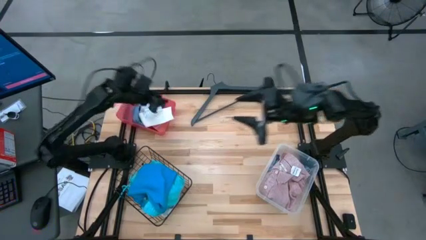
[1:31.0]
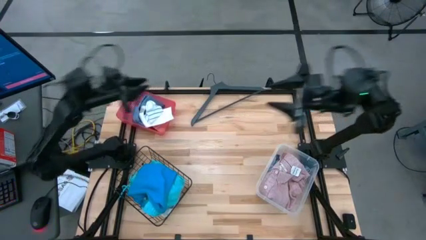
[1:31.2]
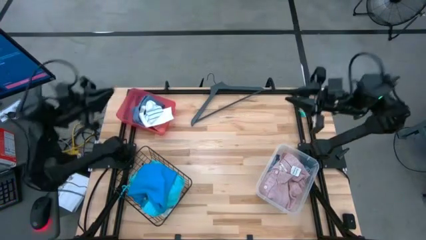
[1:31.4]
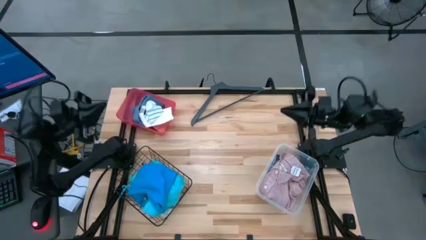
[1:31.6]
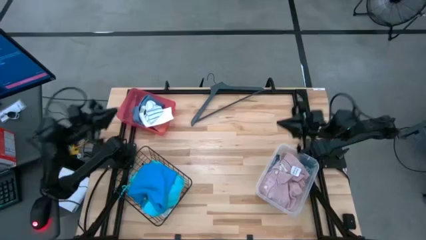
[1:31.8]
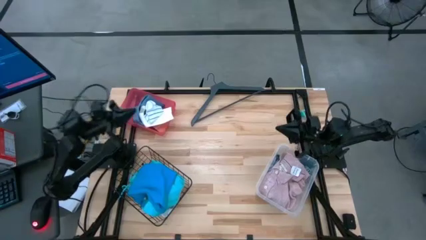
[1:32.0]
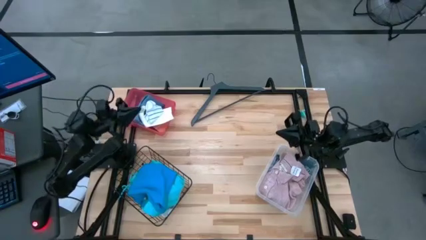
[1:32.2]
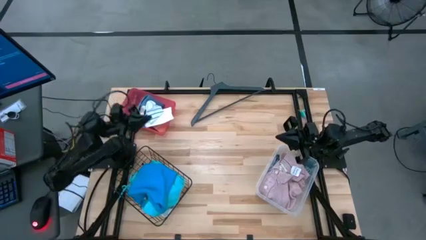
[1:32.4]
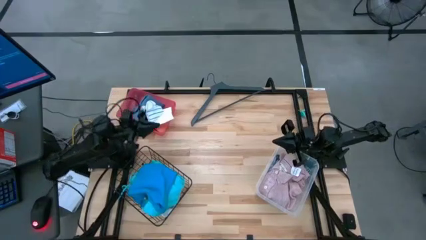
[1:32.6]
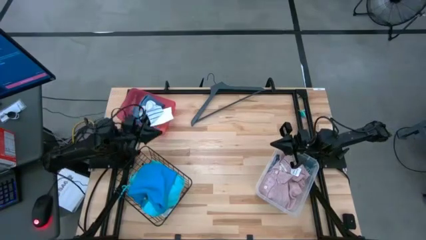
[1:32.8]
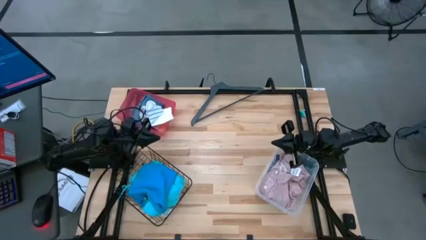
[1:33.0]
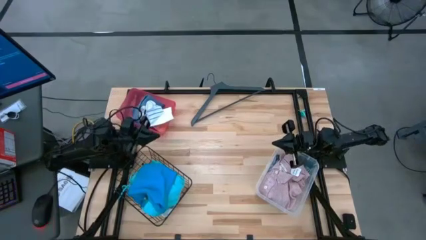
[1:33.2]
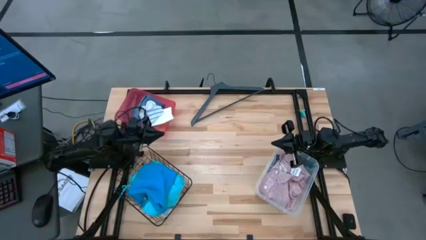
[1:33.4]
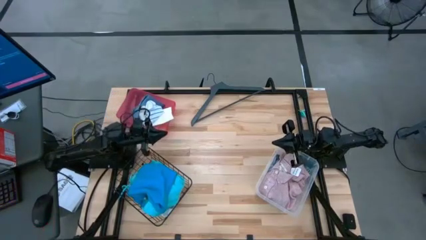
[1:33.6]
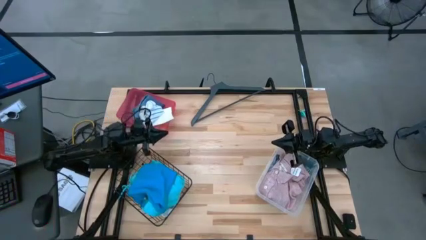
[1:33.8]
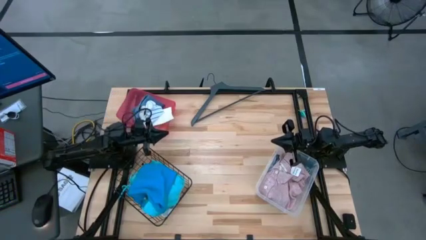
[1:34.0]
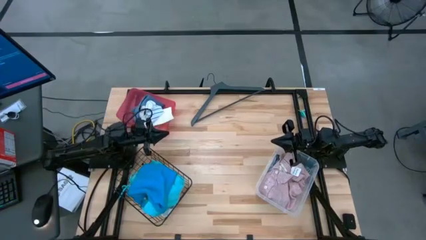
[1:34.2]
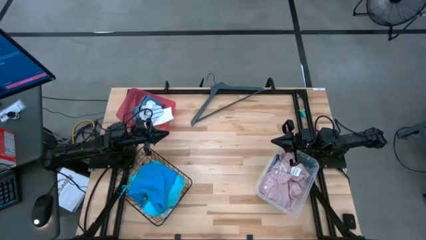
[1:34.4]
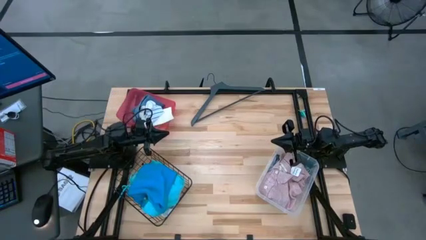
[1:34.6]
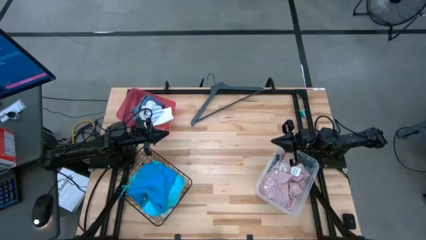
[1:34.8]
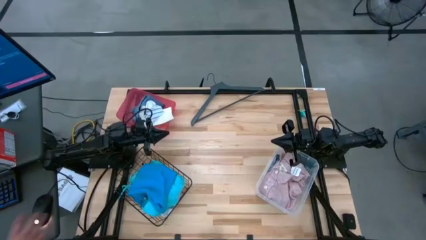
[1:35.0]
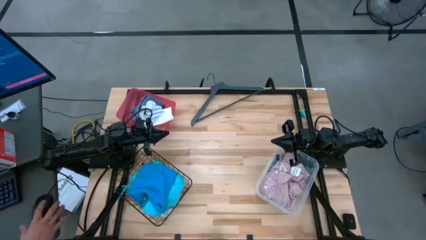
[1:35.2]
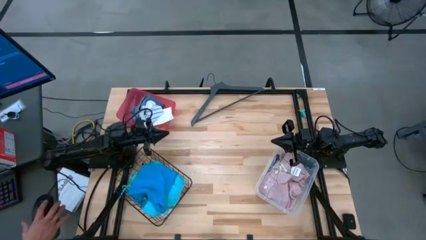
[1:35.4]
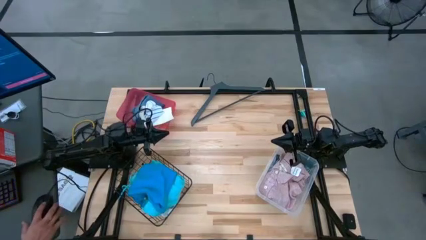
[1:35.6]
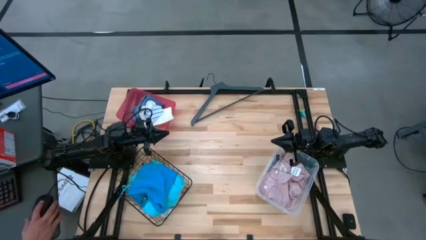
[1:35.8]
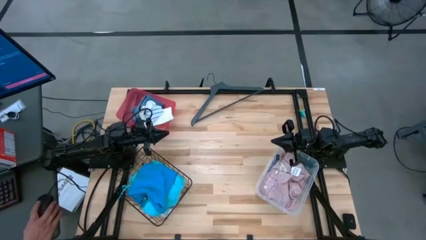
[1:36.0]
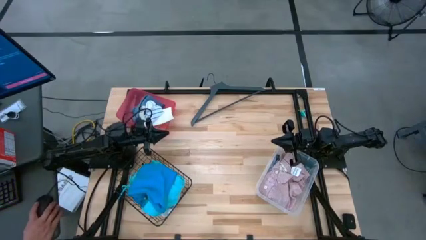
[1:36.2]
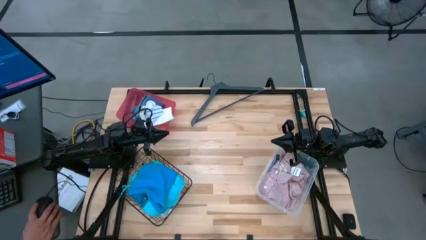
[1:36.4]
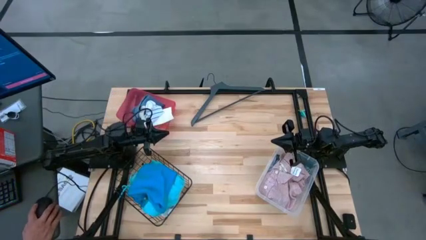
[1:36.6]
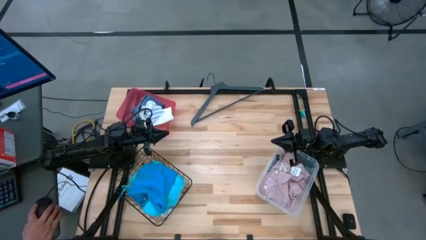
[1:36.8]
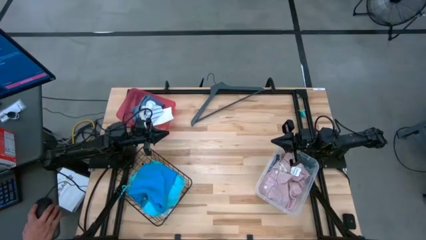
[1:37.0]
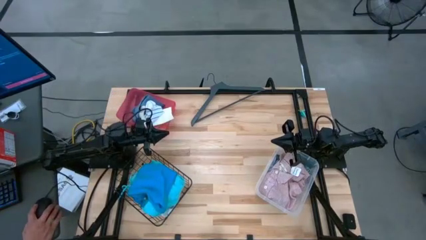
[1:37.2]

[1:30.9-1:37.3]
Task: Pick & Place Cloths
Return to Home Position

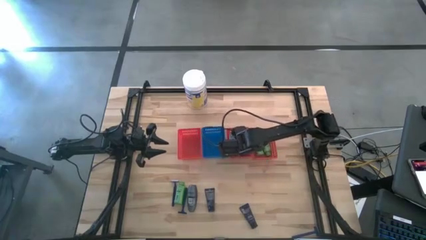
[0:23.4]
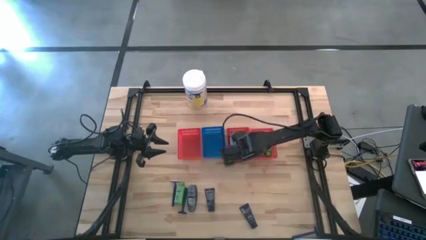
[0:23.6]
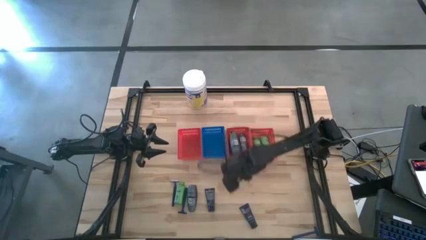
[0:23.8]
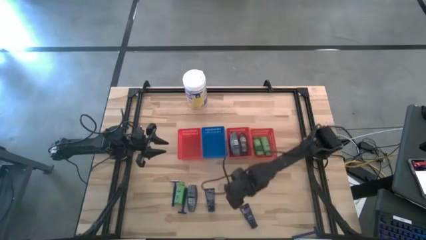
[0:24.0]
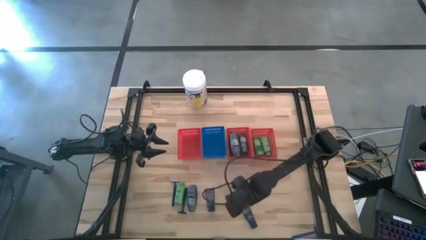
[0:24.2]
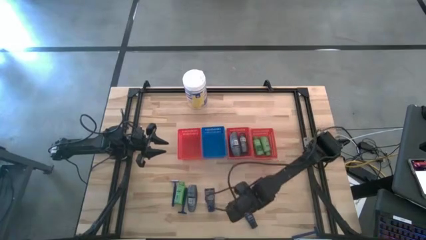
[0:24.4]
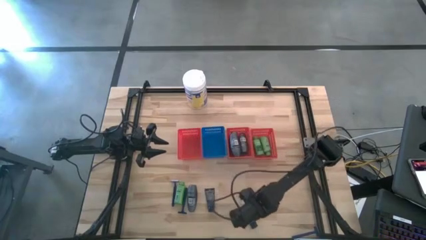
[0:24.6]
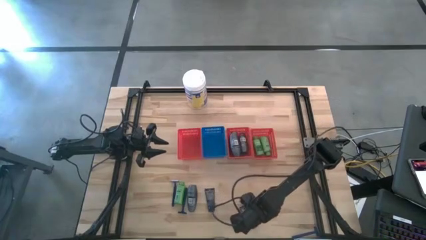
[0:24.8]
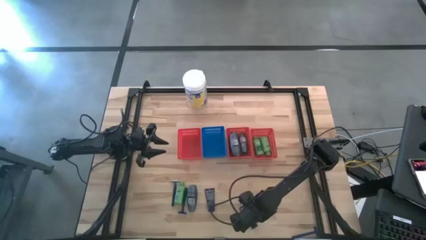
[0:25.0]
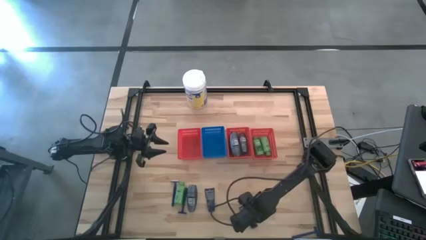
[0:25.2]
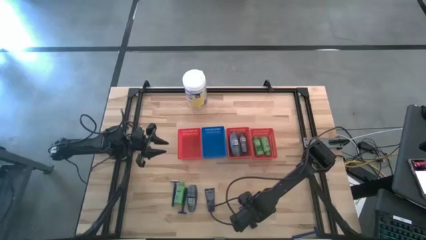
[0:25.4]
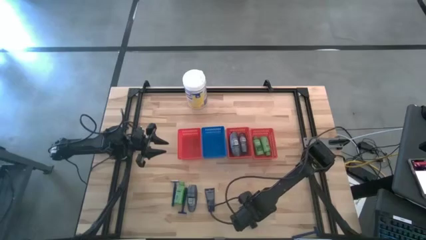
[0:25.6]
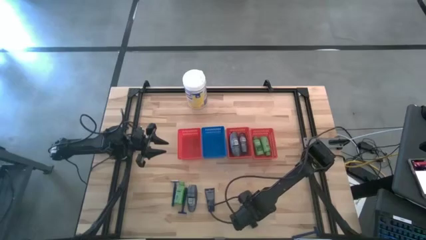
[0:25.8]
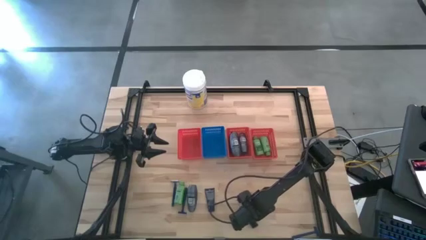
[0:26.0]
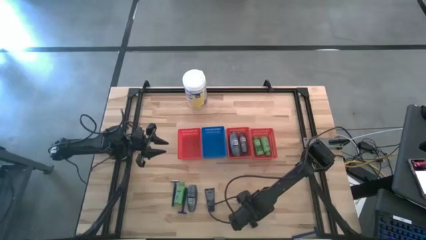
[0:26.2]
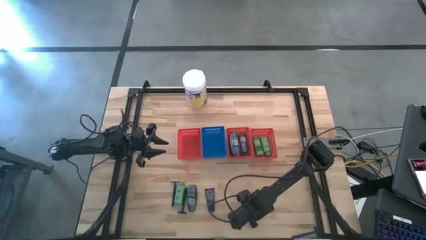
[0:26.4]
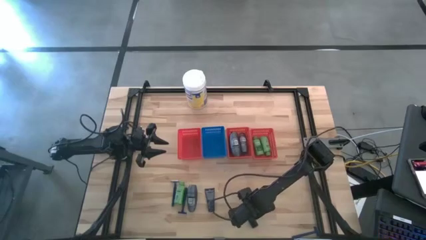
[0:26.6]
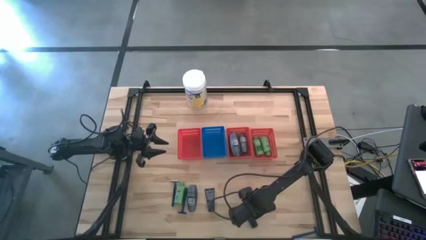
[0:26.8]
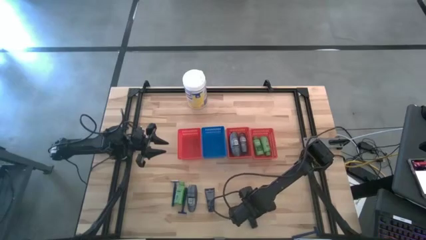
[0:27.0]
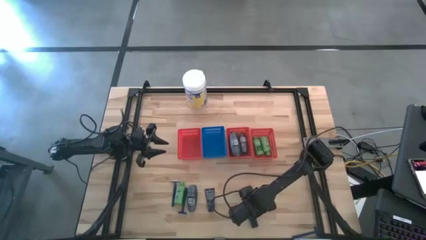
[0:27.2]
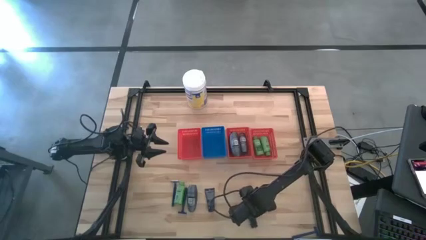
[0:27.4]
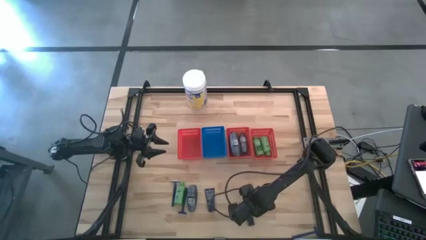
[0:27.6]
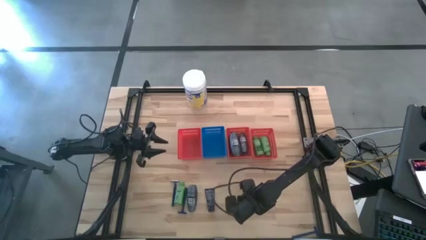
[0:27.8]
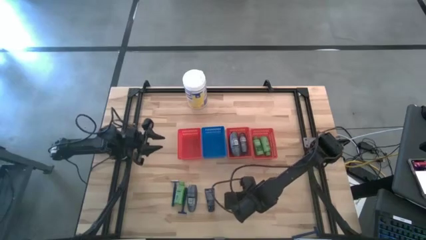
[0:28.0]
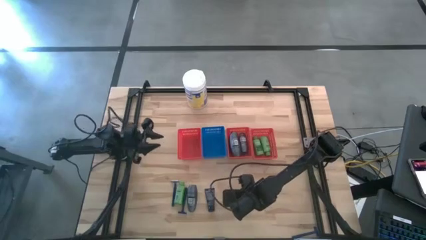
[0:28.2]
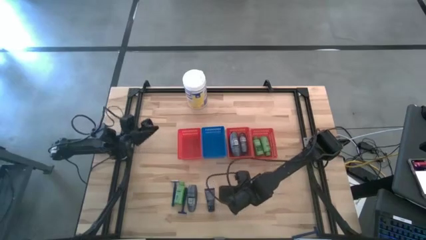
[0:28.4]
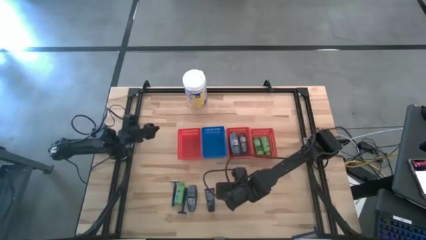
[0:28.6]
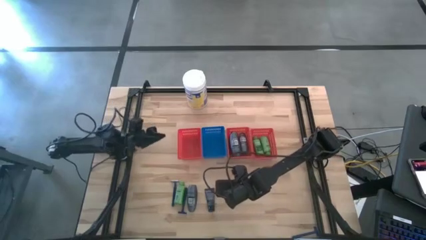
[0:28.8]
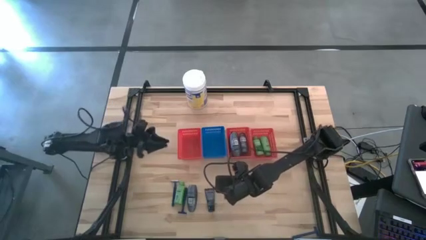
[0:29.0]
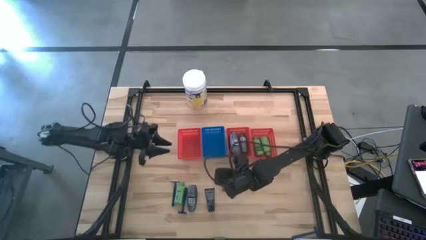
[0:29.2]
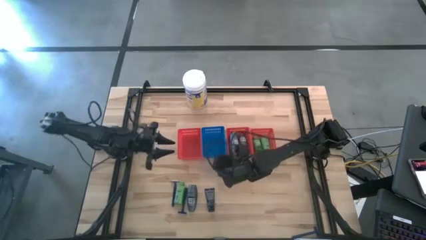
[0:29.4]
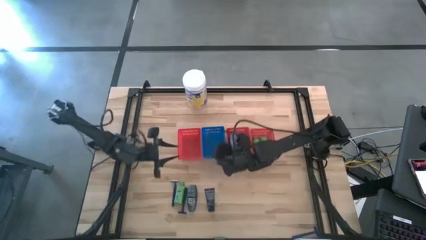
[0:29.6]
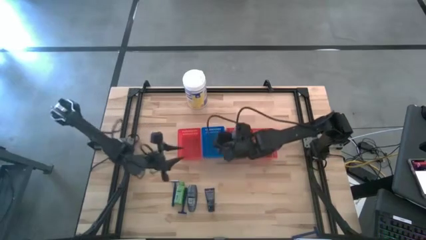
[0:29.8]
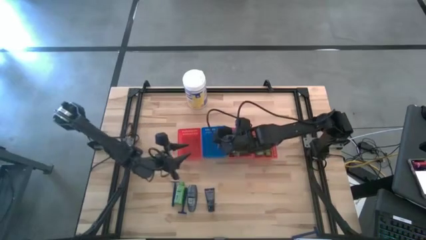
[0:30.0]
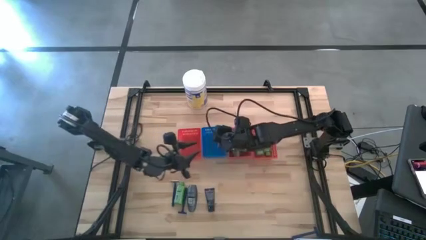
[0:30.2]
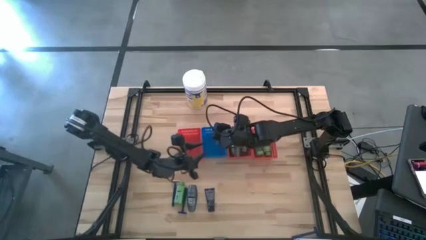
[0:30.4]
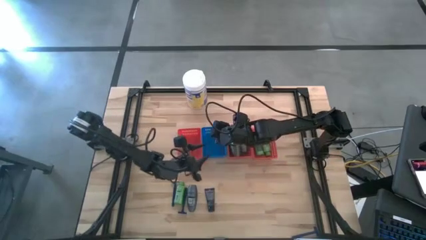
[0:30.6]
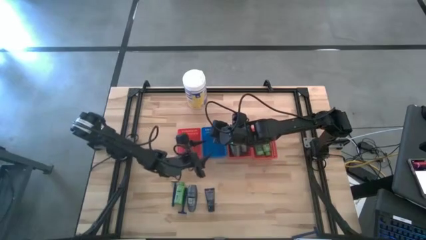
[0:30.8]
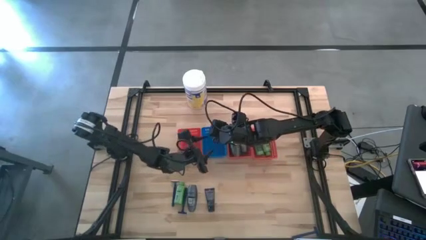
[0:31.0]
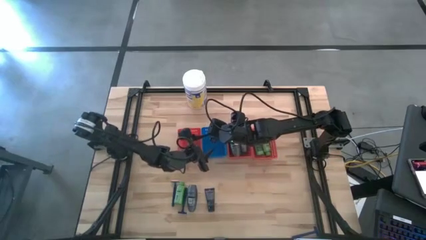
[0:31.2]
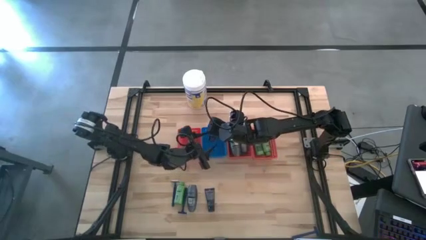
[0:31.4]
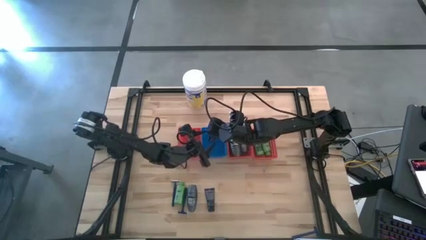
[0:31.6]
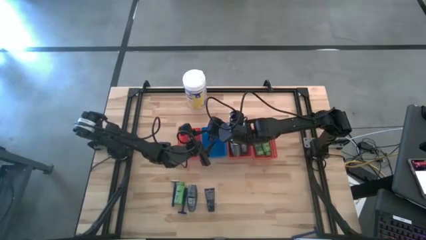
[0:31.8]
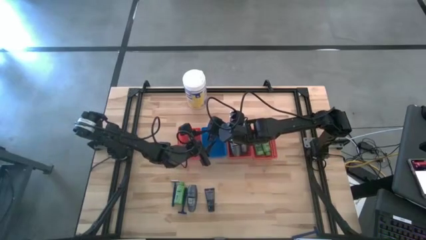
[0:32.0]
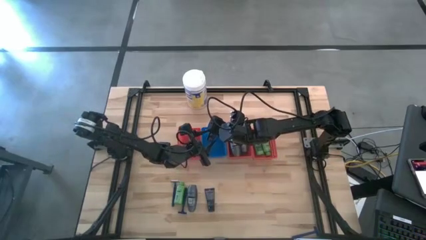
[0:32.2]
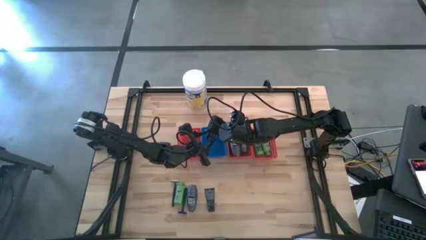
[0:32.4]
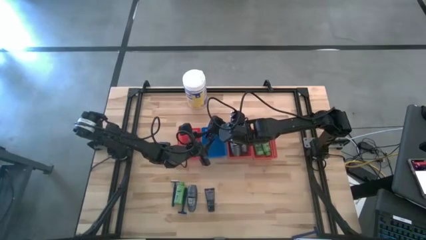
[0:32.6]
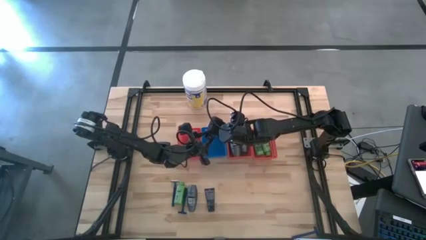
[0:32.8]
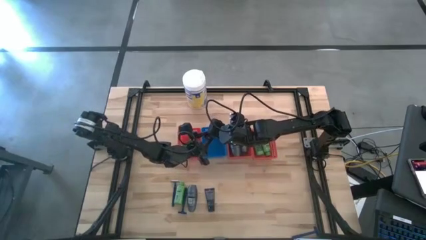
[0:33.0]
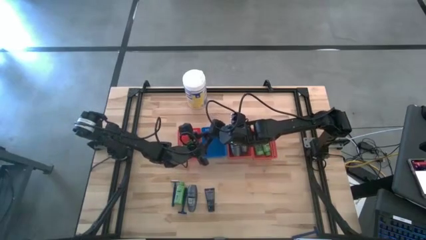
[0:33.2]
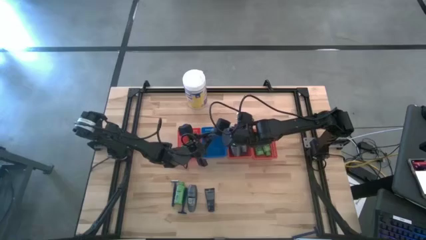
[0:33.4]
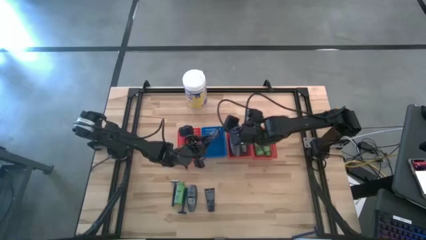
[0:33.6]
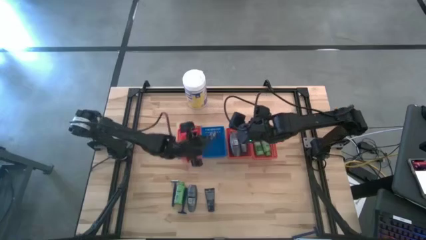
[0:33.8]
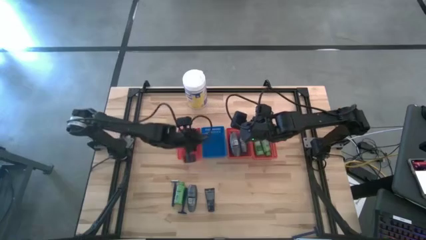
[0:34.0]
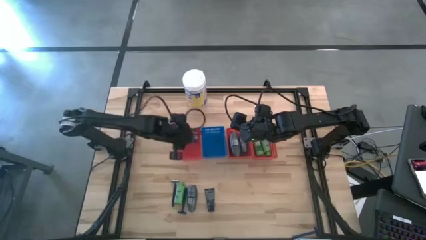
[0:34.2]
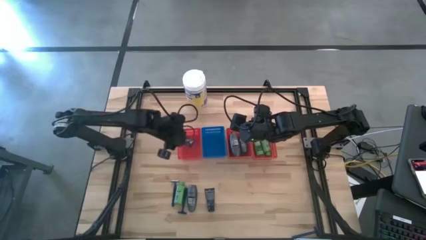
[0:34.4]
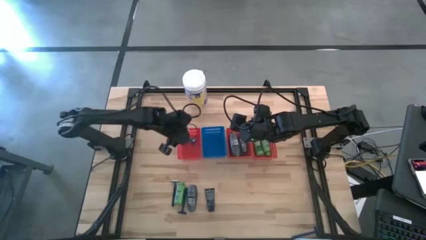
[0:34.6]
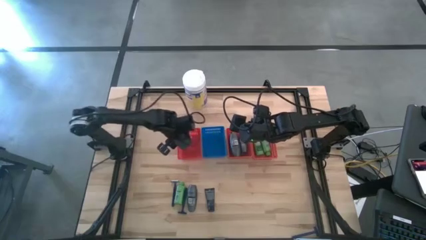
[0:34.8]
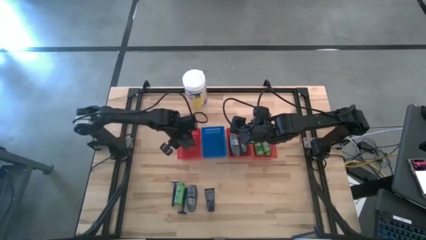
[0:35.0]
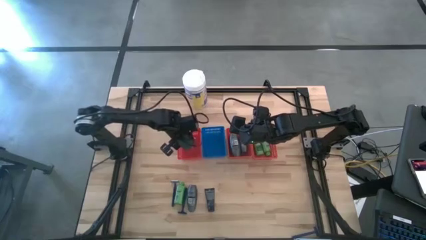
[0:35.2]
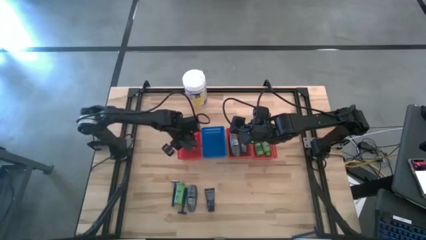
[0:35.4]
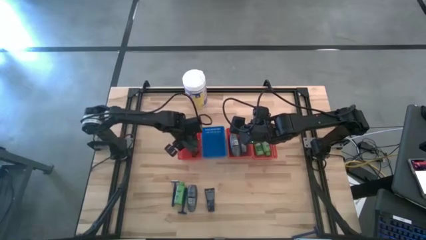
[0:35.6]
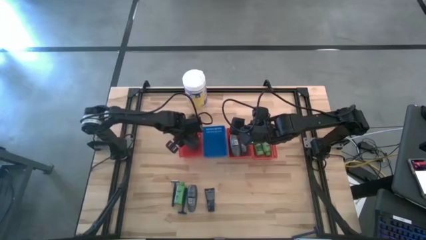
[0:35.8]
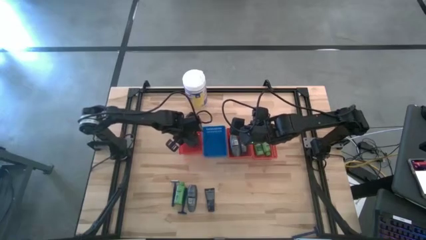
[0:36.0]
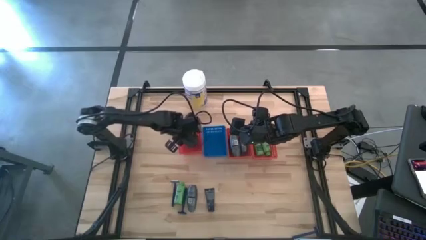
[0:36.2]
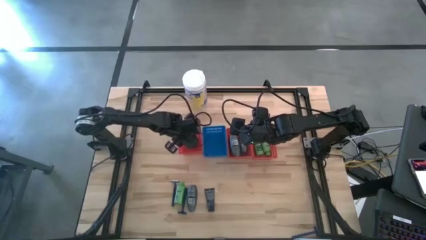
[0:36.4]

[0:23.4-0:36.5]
Task: Pick & Place Travel size toiletries
Put the bottom blue shave cream into the red bin
